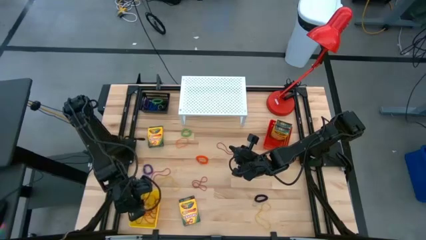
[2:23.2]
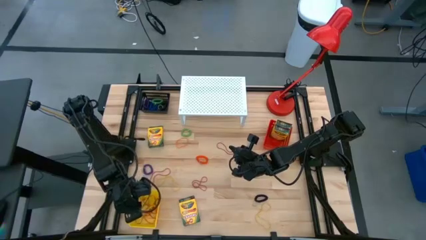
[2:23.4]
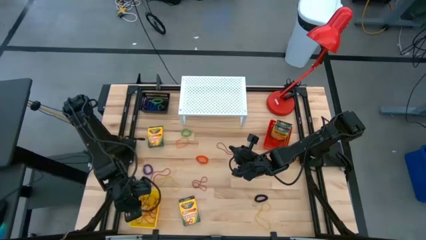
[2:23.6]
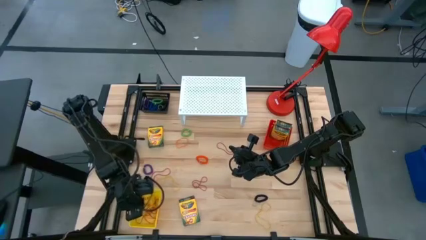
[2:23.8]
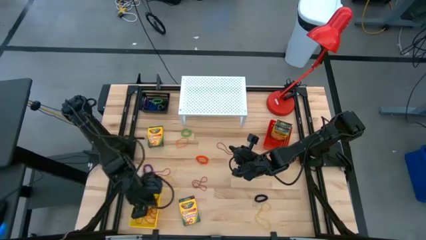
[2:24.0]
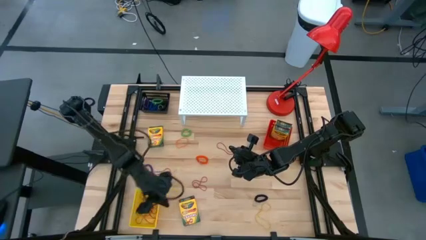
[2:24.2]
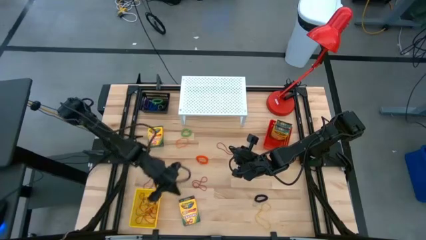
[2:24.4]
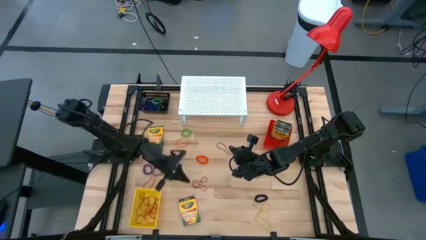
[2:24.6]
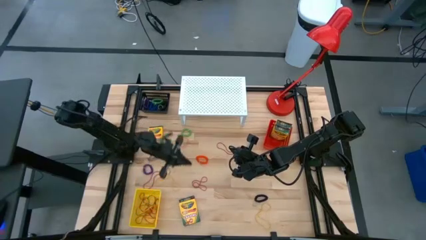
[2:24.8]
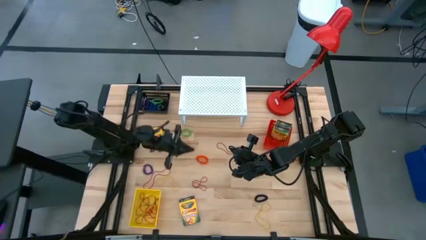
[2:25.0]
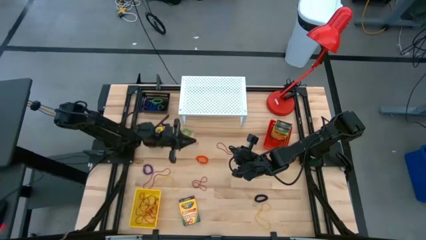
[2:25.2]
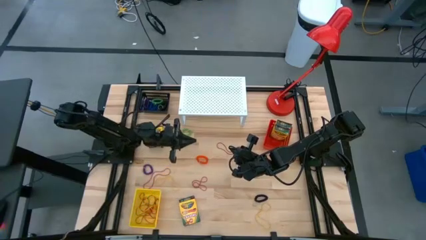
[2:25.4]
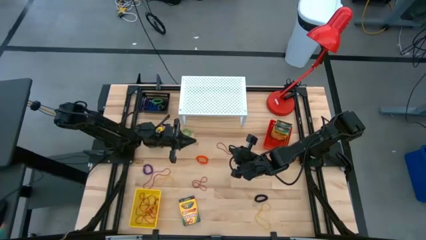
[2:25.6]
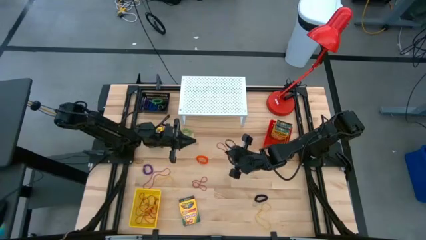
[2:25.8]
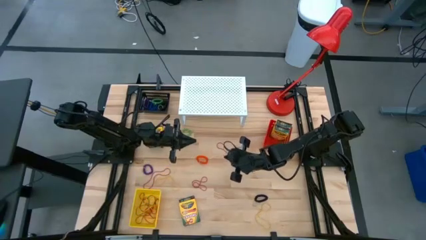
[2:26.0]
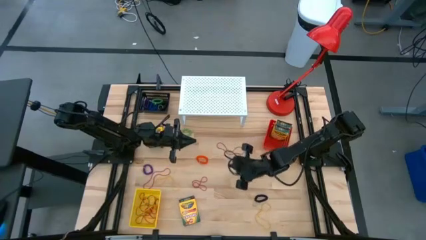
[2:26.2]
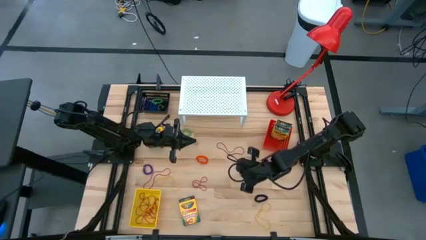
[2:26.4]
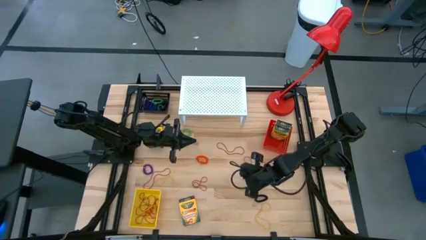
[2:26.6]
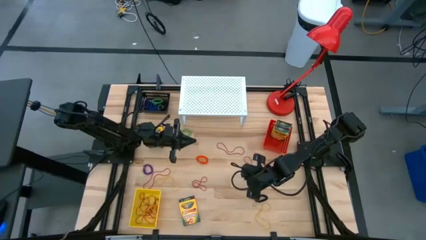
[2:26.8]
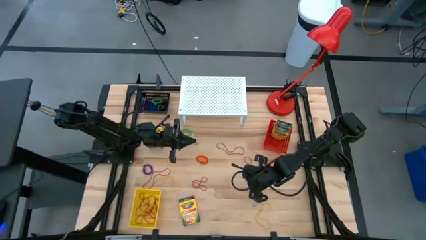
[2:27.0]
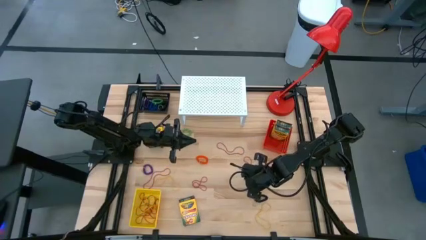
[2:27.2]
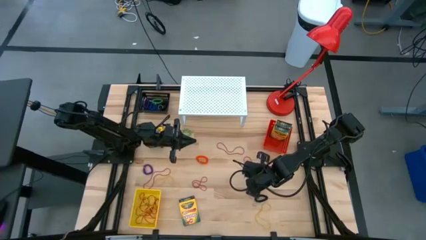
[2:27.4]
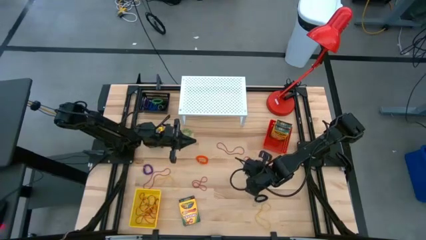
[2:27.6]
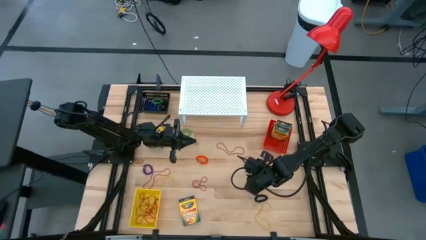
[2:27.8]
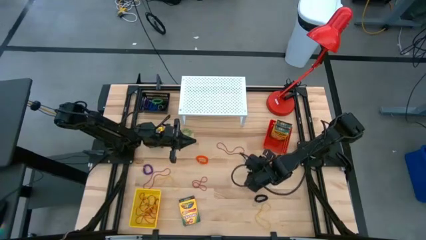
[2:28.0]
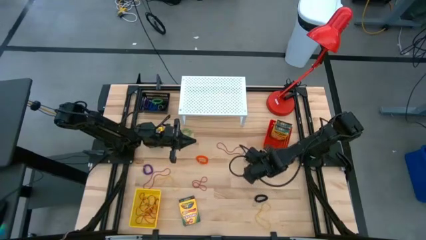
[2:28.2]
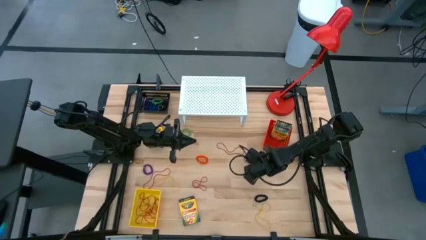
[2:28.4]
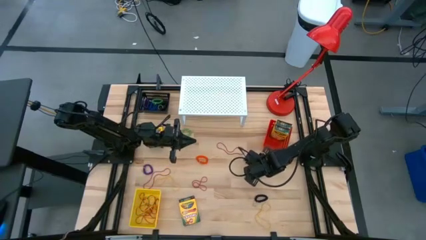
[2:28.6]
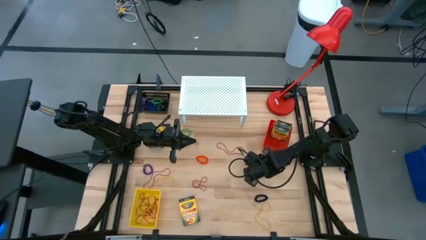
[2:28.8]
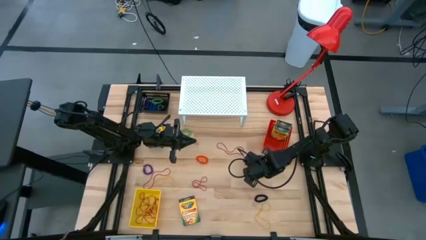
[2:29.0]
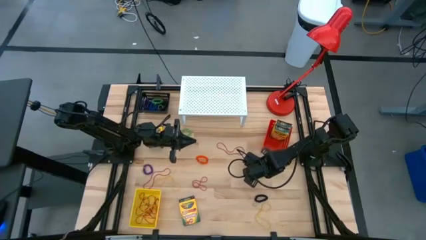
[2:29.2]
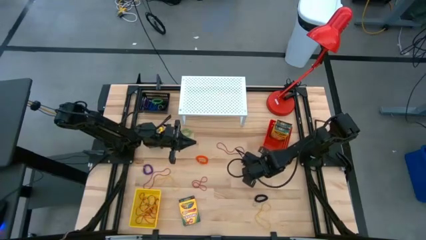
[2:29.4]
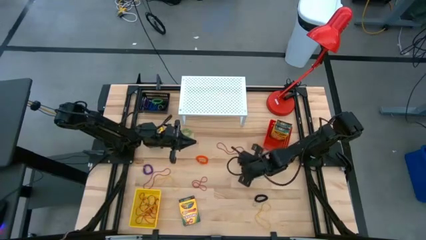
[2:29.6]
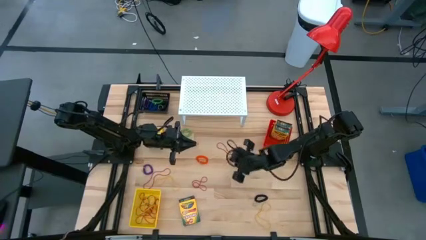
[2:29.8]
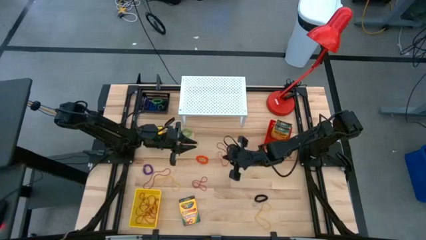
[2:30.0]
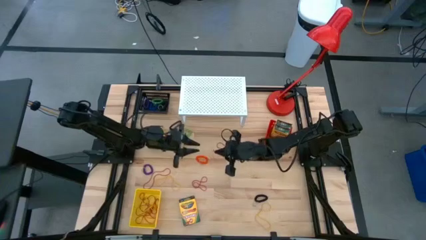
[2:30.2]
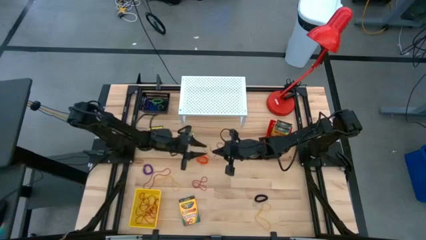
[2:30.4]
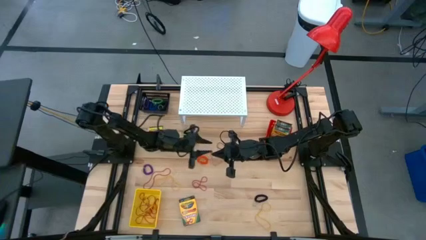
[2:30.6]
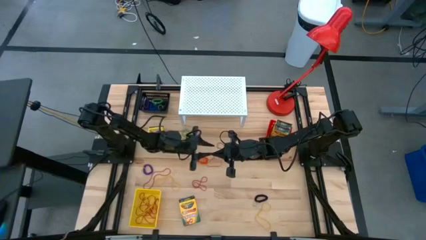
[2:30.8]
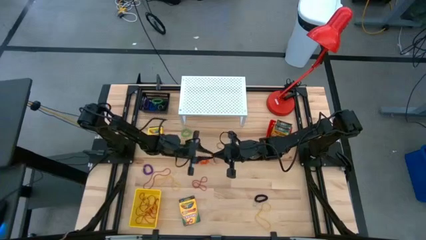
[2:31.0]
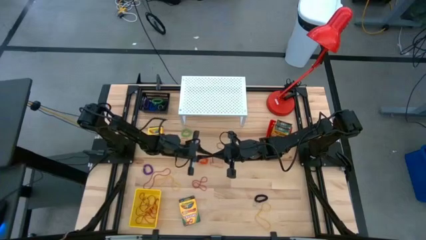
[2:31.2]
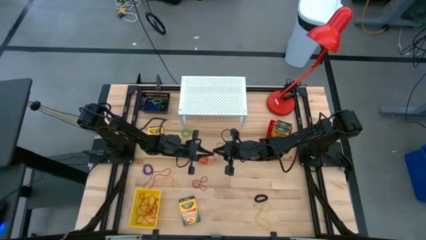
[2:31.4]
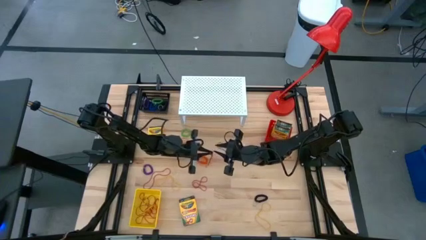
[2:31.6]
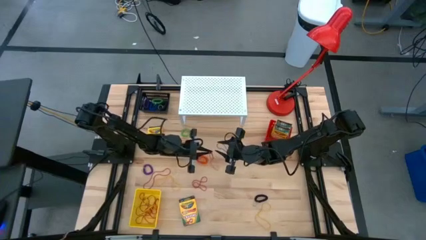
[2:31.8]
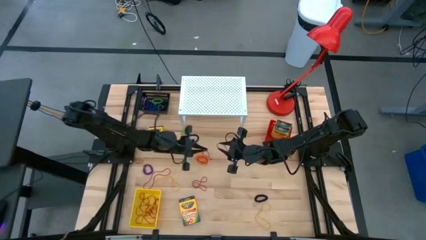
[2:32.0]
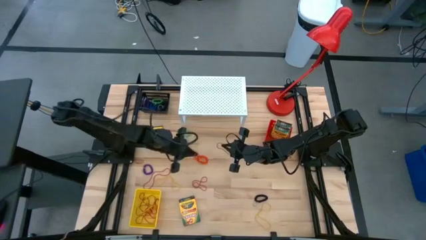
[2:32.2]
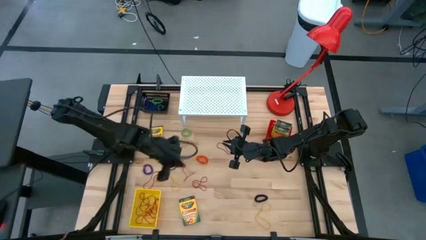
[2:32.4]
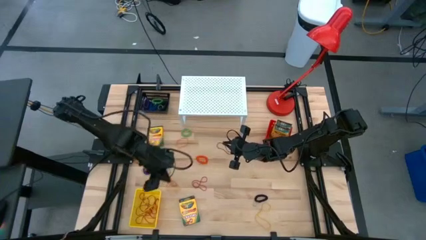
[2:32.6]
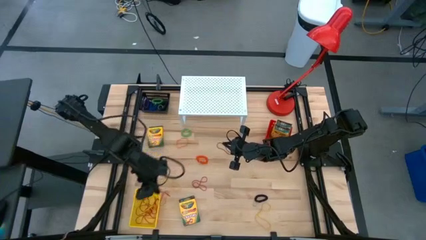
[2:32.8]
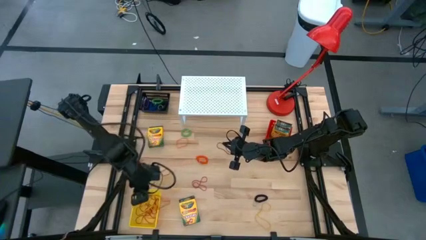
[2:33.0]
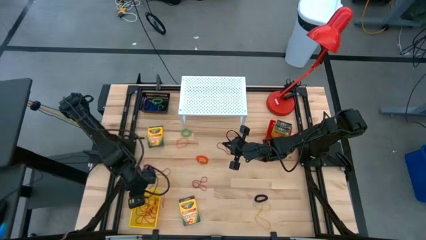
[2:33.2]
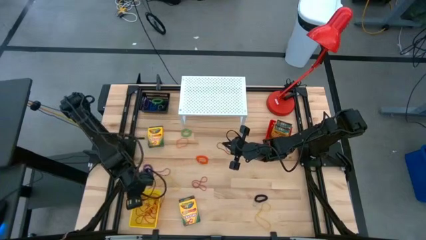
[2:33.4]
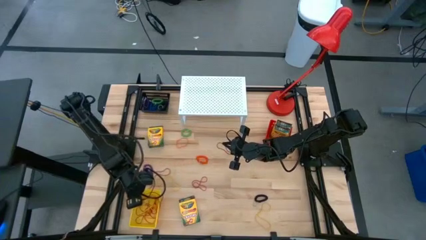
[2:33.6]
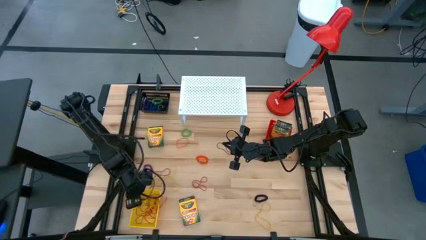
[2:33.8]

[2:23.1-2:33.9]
Task: Pick & Place Office Desk Supplies
Put the red rubber band into the yellow bin

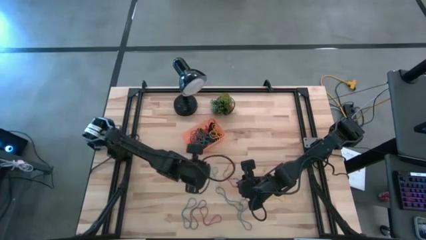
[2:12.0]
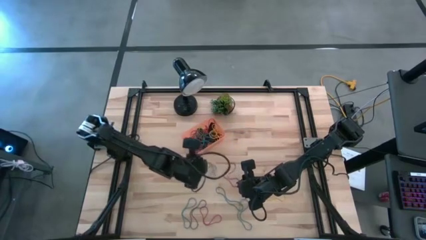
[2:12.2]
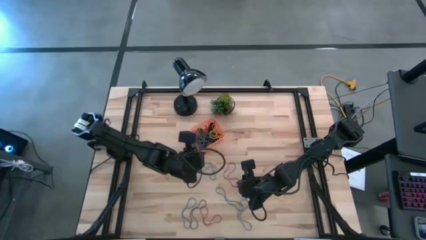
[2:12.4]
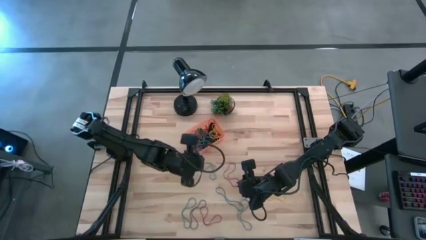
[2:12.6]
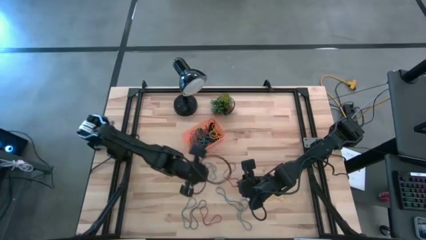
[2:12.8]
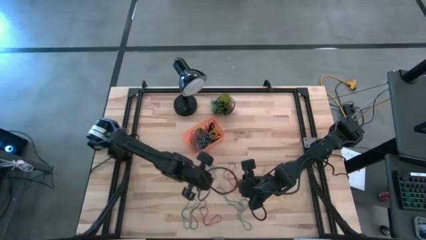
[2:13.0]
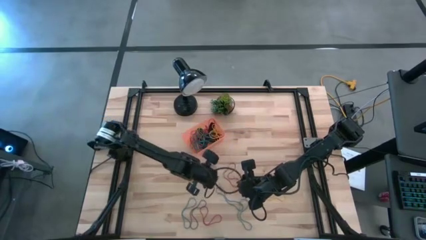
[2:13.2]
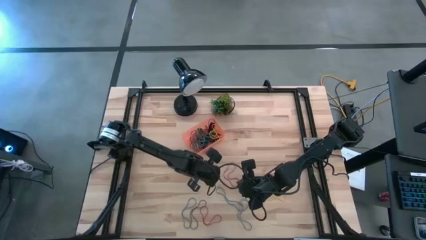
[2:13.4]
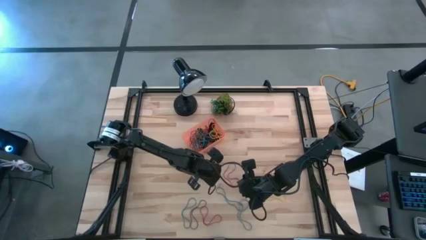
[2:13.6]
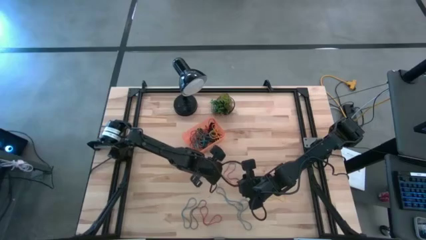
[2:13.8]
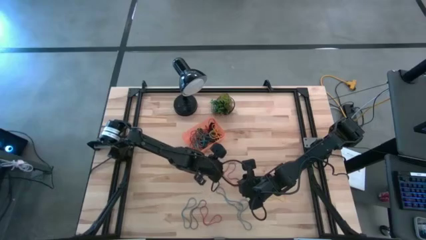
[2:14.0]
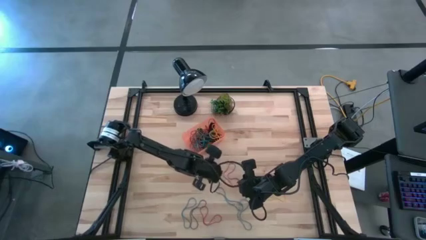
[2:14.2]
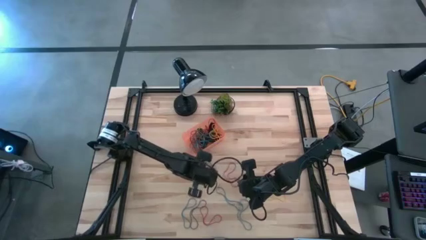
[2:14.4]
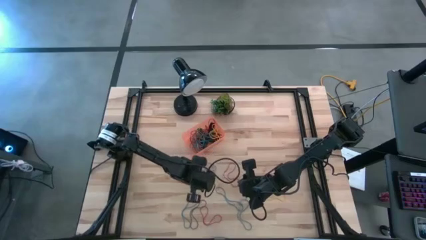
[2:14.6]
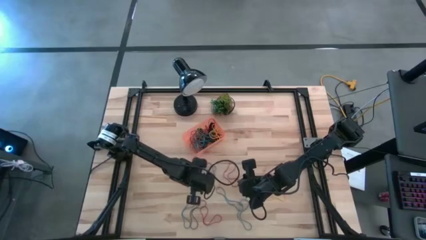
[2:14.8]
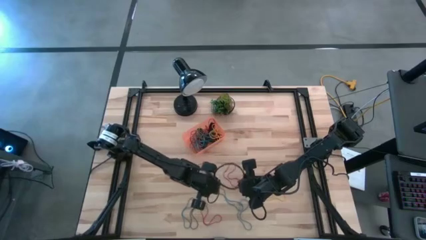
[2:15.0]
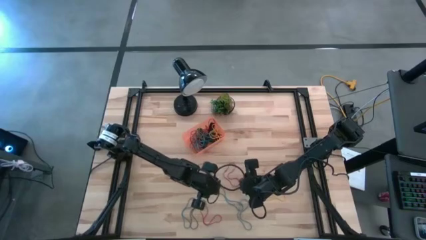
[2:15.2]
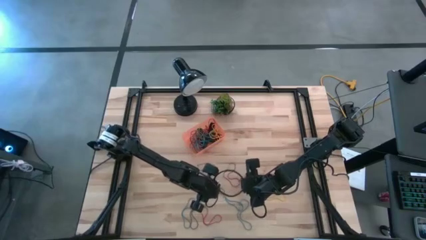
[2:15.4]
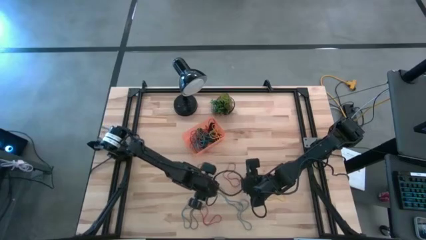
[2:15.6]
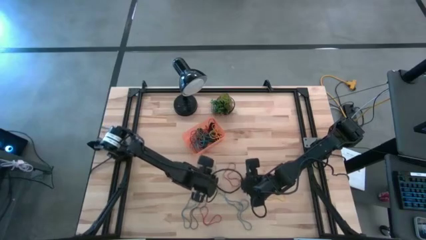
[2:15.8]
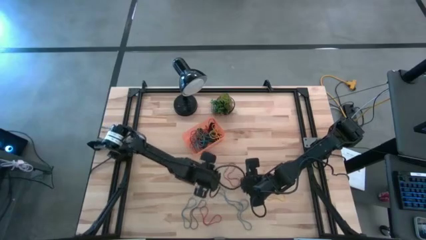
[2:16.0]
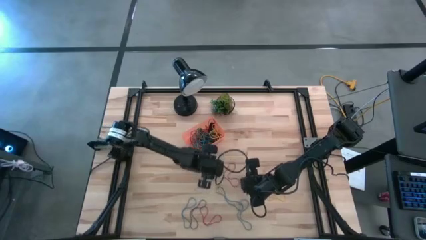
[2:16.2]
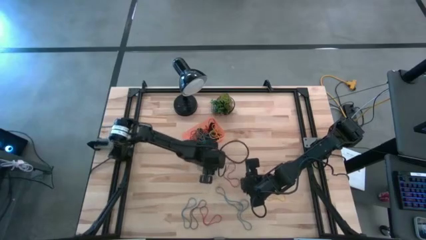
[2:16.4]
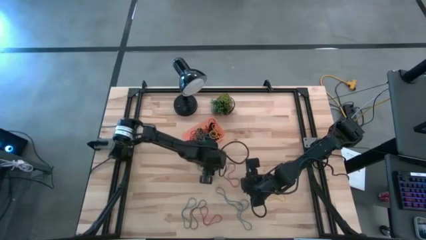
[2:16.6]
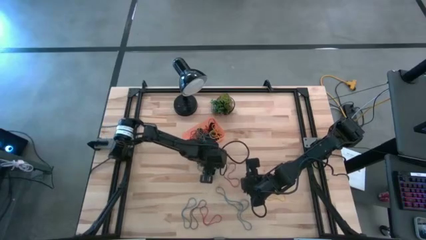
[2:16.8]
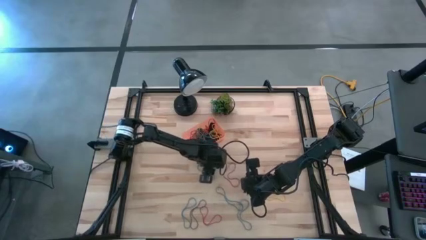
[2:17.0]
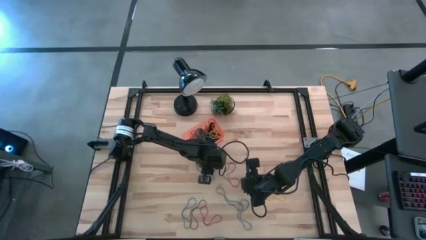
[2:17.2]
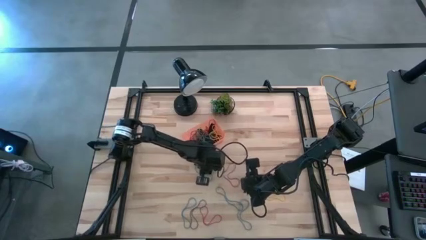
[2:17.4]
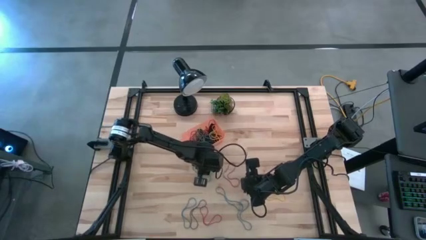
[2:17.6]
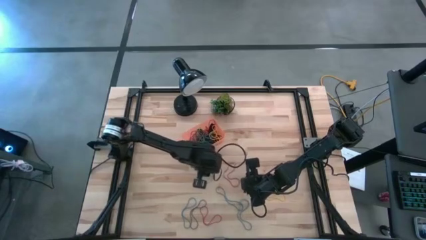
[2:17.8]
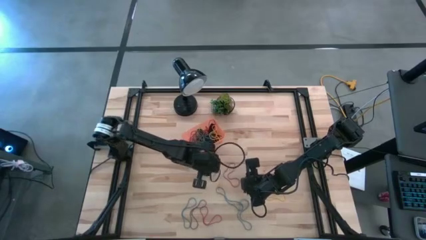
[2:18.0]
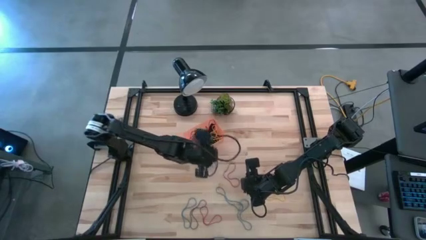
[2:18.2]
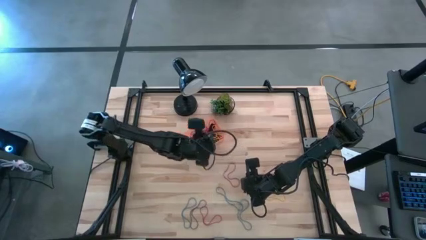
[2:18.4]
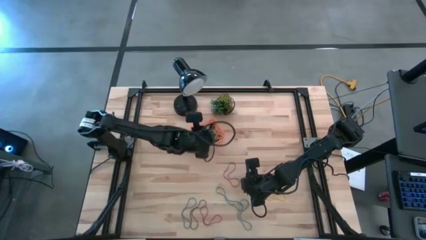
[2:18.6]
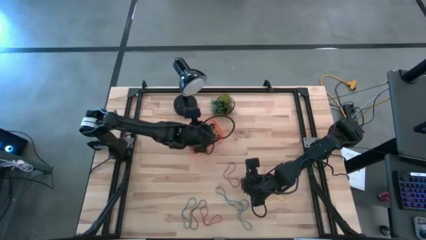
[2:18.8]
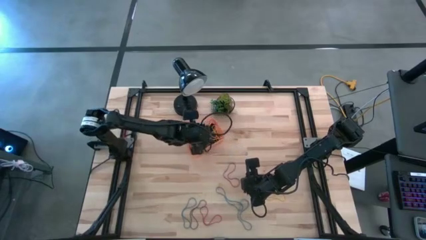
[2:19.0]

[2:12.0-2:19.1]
Task: Pick and place rubber bands into bin
Put the blue rubberband into the orange bin
